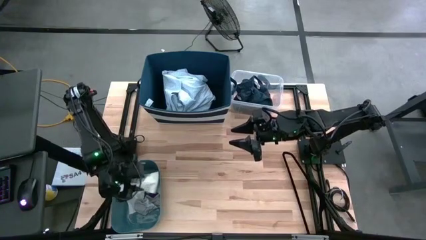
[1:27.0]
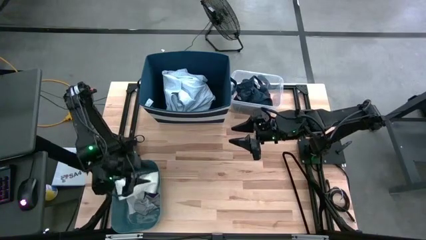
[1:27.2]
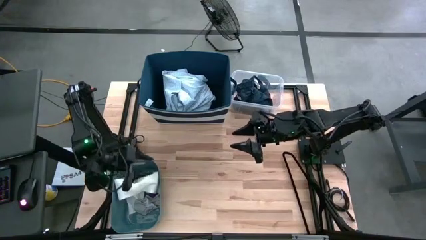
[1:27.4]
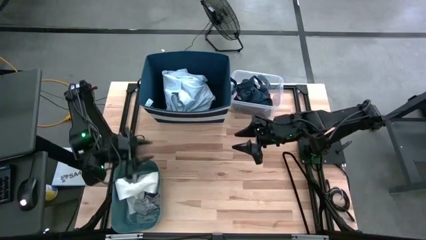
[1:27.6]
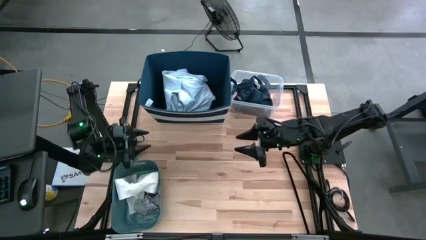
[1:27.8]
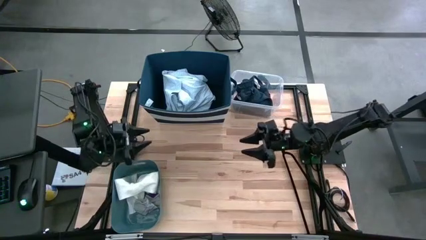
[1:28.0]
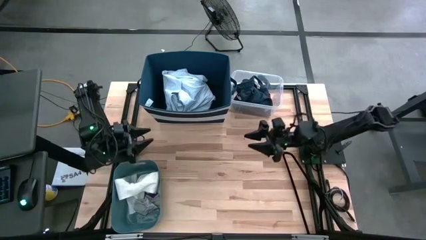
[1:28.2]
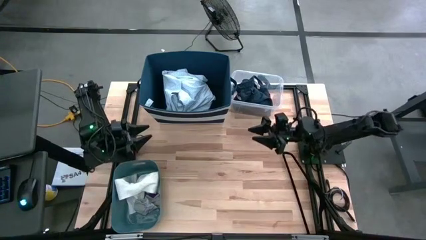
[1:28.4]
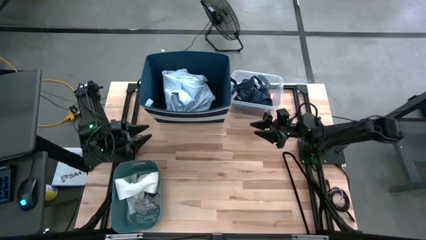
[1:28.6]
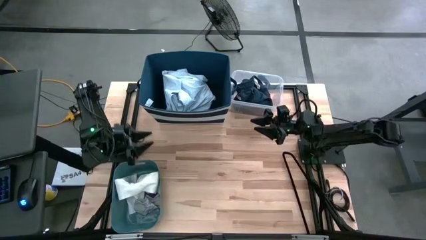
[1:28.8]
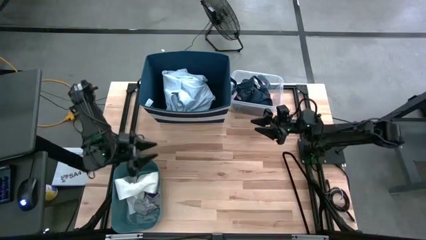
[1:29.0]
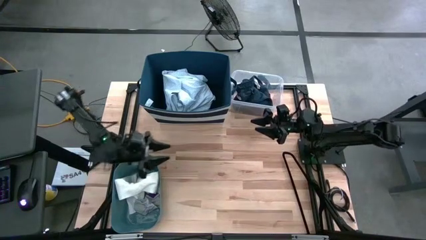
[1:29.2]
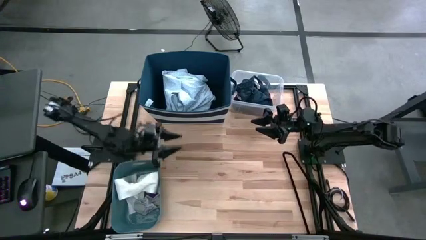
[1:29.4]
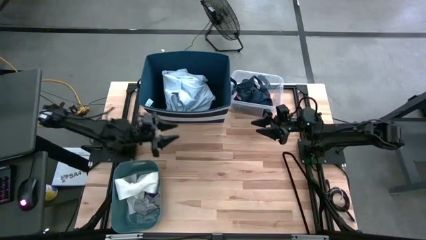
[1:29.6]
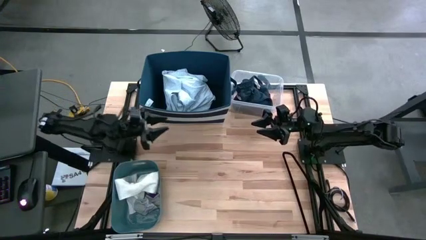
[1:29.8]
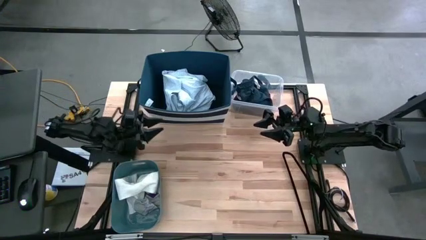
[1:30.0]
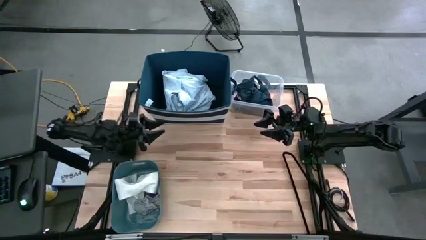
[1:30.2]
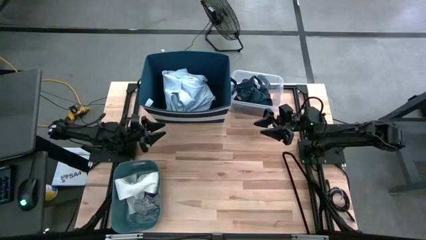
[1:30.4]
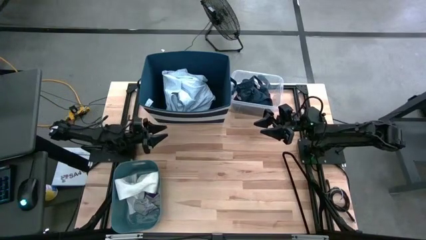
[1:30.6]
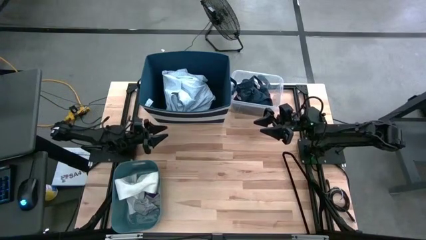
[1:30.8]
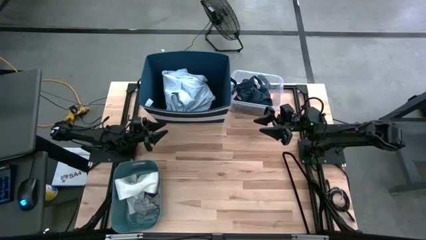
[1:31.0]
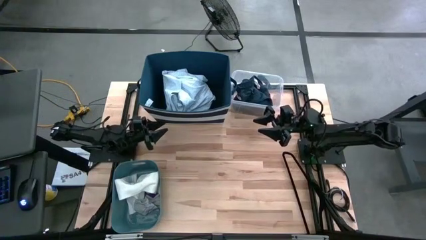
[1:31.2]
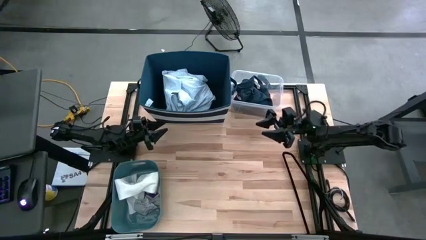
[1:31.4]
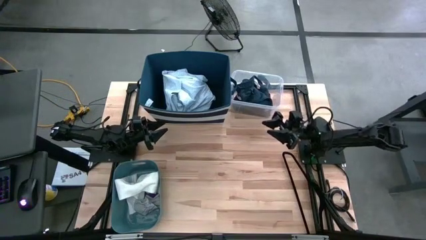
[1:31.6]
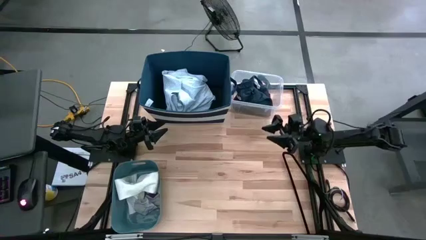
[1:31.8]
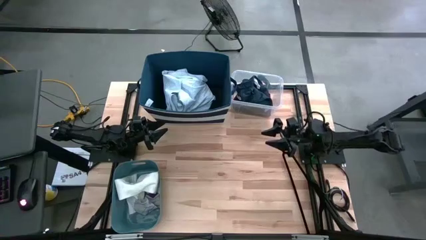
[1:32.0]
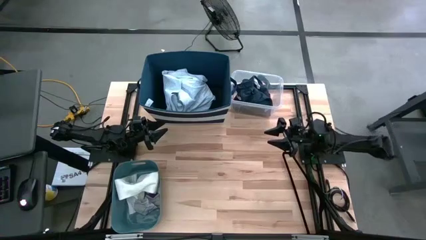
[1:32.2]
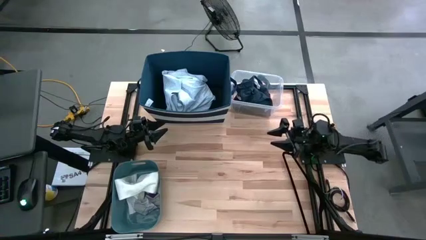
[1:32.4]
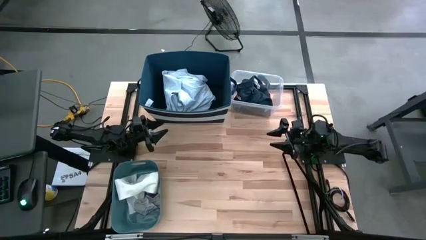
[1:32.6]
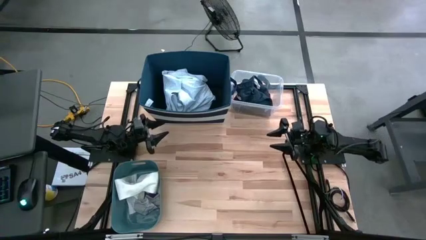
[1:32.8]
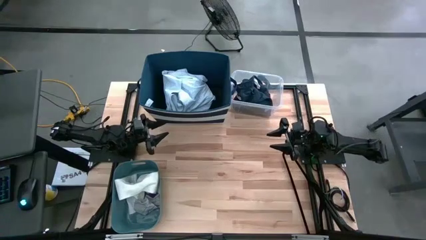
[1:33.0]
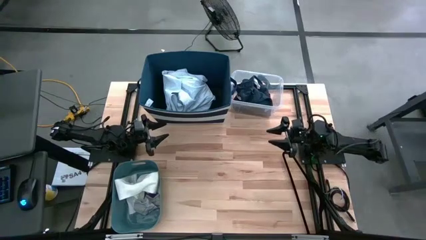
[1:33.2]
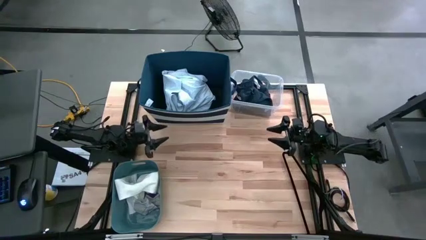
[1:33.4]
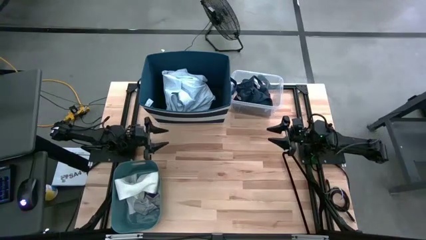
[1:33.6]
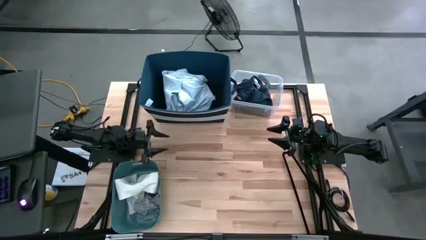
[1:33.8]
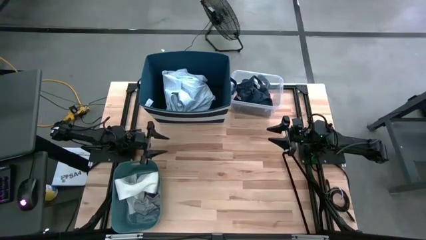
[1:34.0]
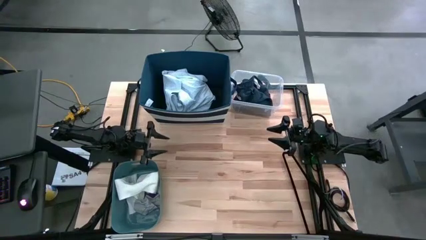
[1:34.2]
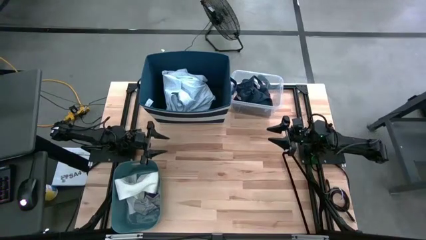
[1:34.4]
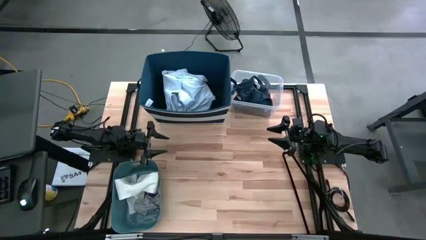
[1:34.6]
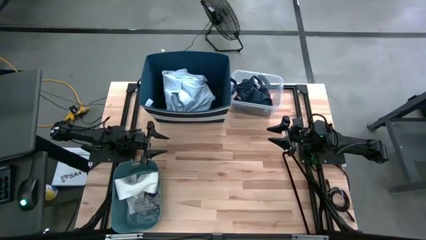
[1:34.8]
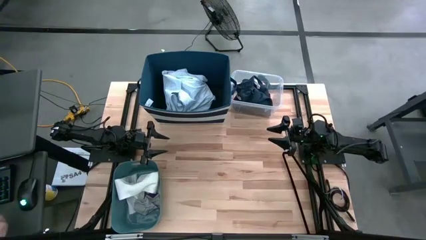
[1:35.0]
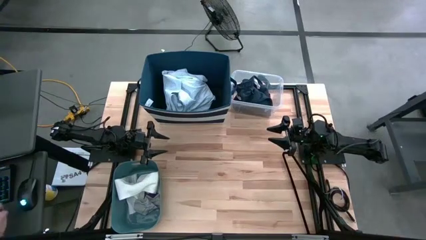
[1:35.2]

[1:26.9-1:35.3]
Task: Pick & Place Cloths
Return to Home Position

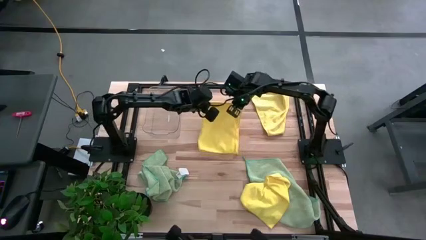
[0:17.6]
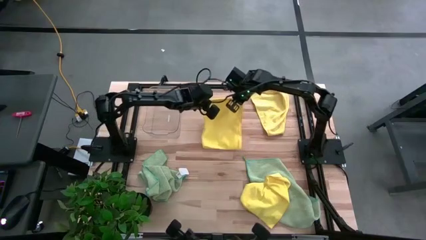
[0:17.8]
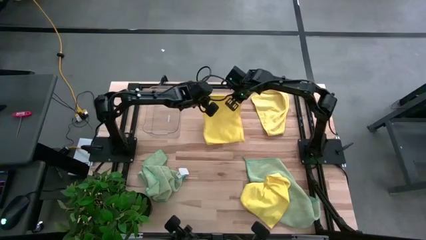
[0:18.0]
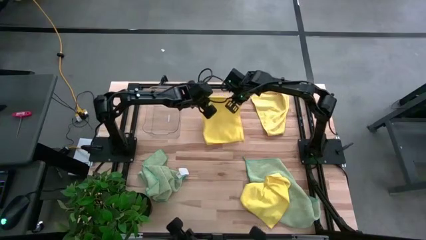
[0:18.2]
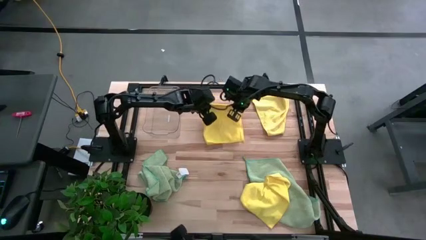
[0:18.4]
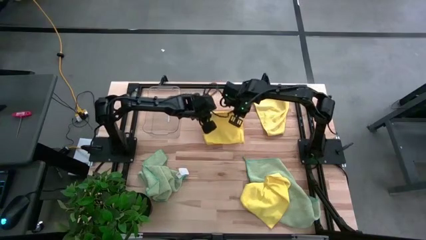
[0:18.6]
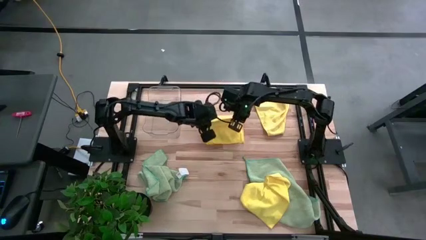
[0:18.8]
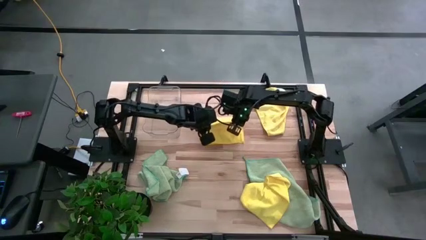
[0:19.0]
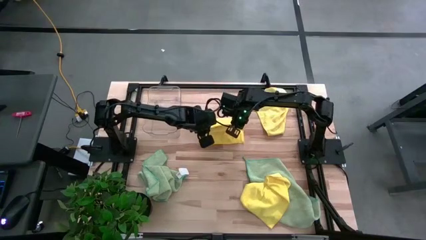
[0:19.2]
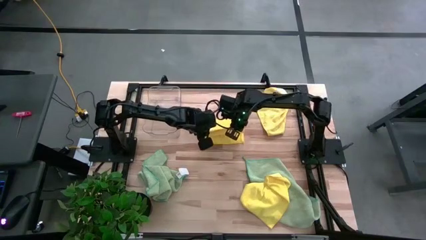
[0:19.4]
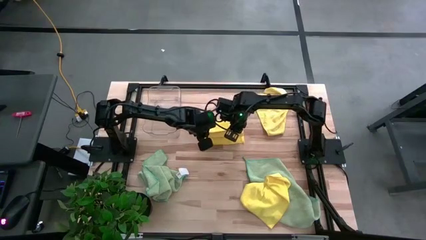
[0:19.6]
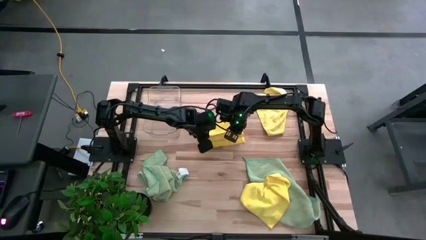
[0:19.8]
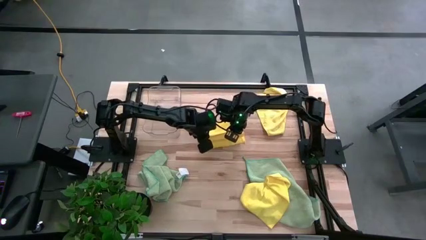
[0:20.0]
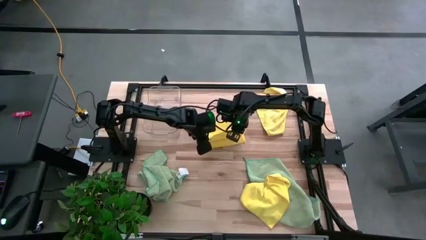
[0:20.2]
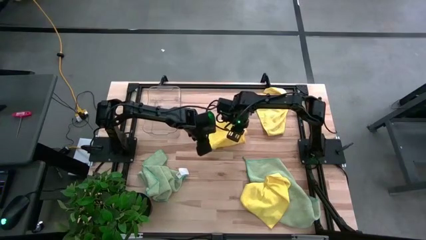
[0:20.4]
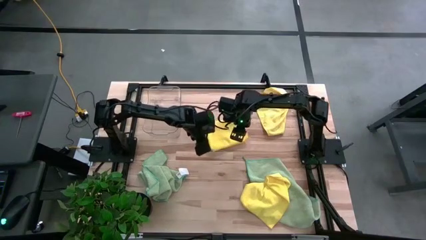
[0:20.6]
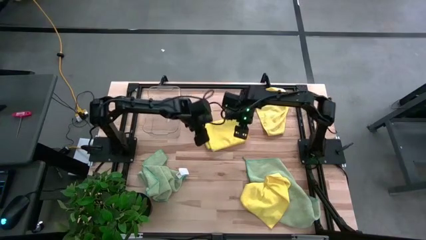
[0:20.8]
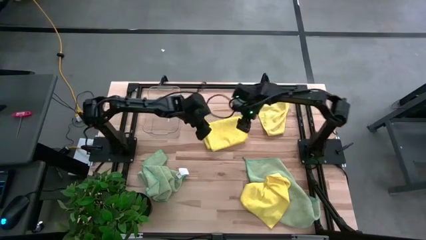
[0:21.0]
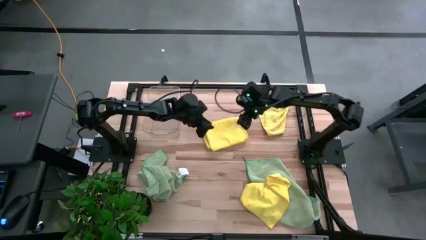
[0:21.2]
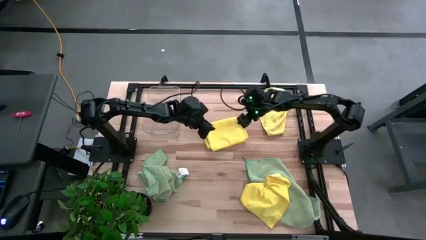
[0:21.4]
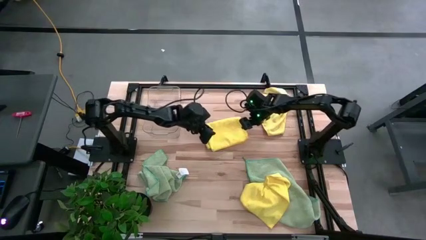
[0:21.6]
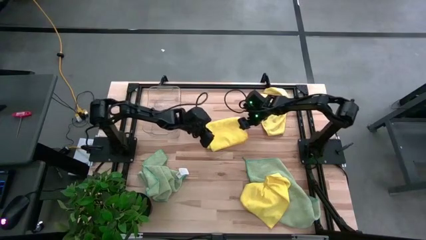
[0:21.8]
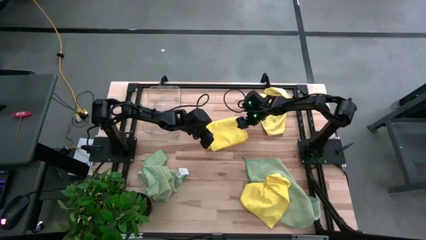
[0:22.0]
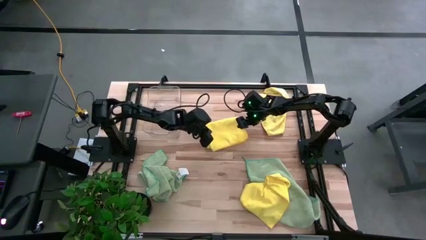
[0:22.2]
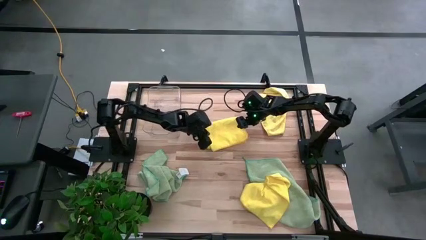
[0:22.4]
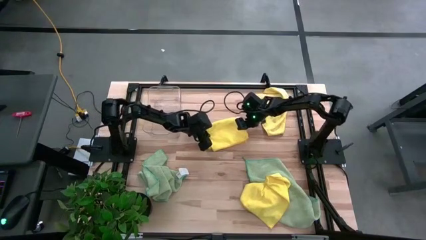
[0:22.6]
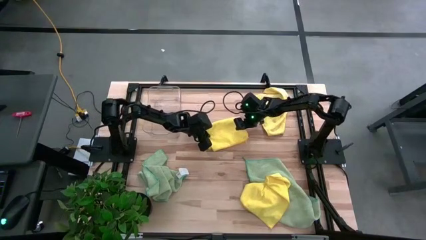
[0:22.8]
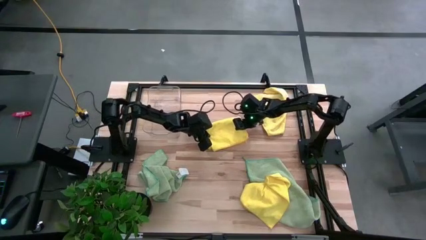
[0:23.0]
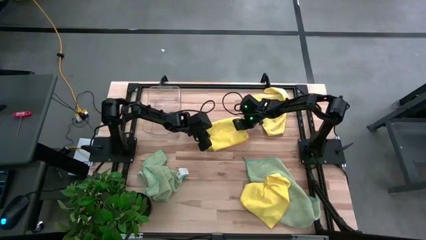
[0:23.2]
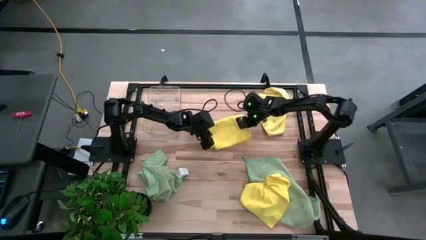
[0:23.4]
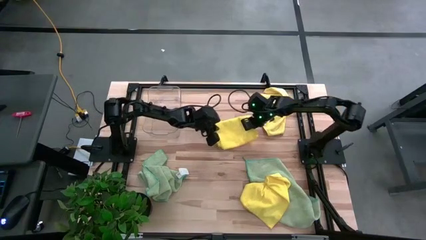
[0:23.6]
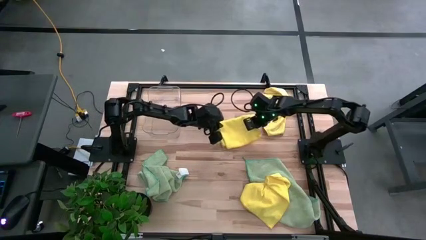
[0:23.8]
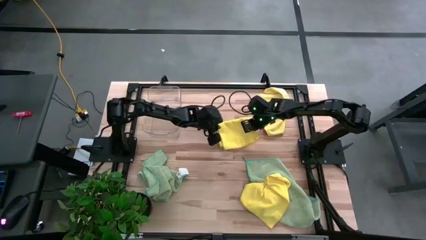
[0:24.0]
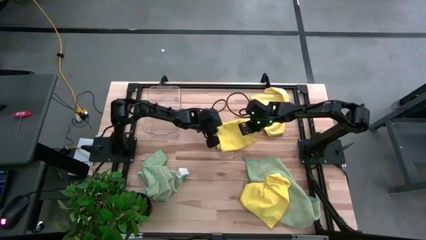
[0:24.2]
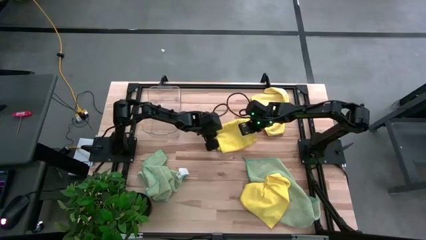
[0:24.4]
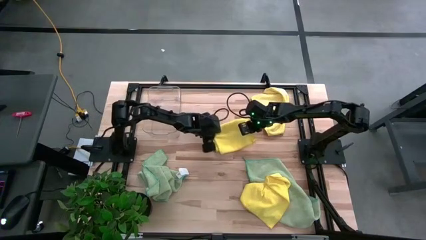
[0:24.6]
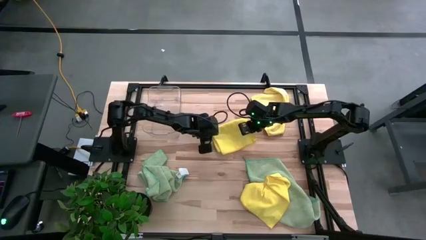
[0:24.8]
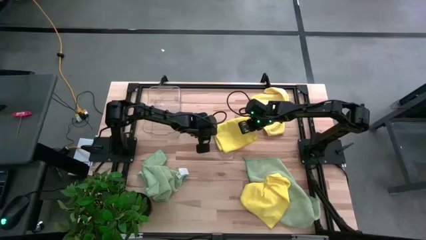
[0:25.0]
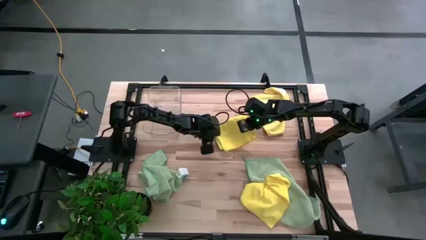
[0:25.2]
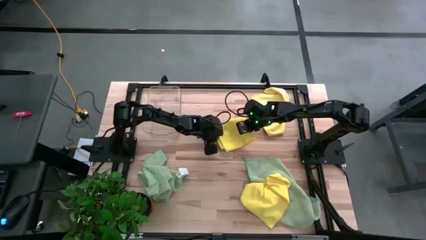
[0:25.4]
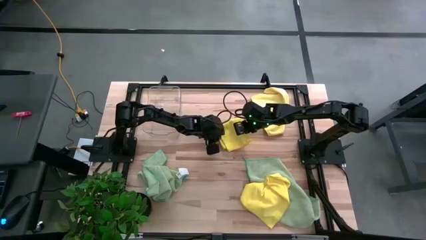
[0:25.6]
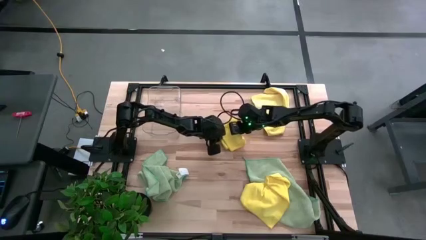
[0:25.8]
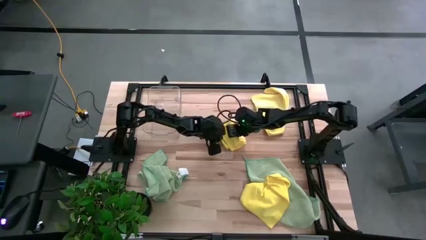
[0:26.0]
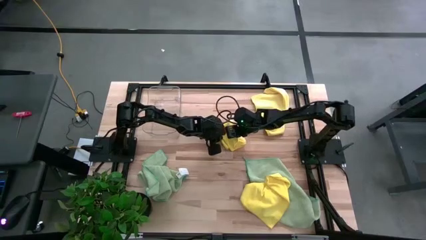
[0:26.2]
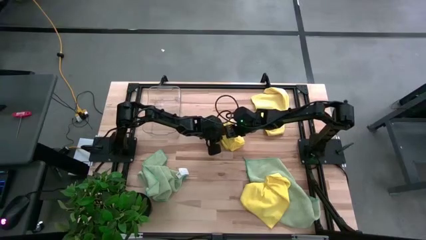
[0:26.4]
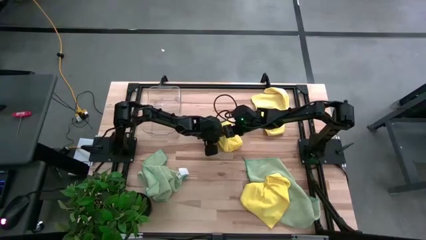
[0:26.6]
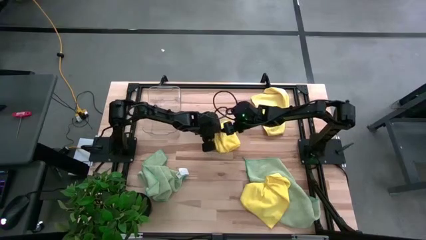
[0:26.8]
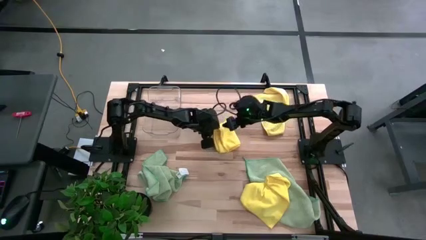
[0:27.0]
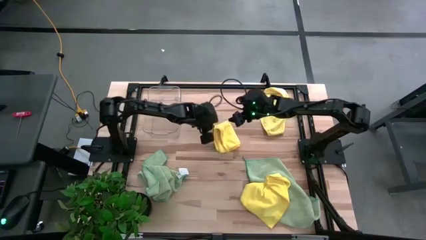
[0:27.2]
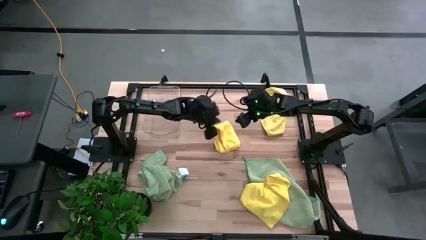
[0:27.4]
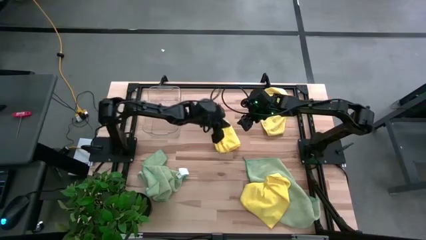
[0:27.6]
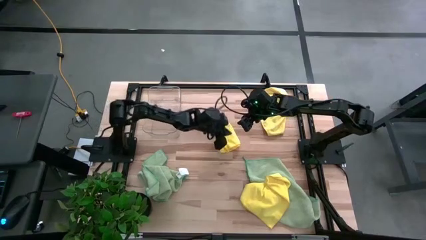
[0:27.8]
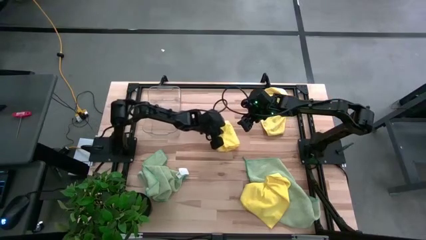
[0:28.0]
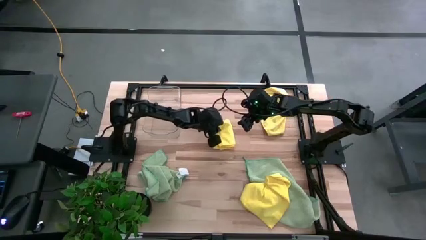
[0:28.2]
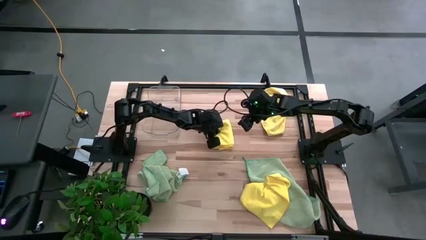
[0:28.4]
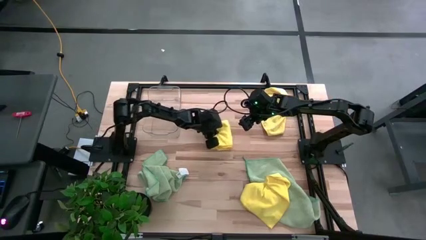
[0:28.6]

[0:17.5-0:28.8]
Task: Fold microfiber towels
Fold the top left yellow towel
